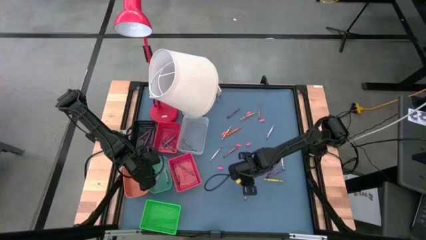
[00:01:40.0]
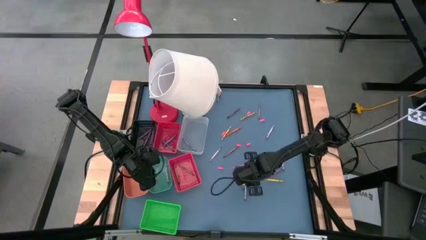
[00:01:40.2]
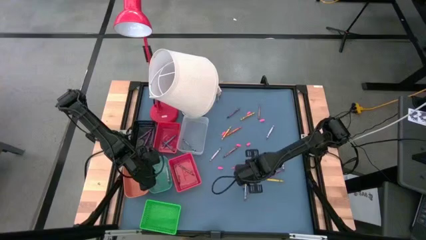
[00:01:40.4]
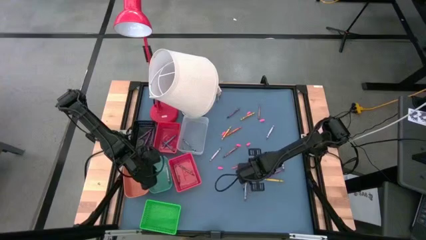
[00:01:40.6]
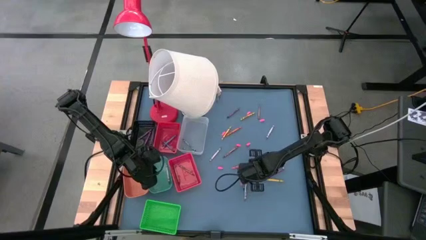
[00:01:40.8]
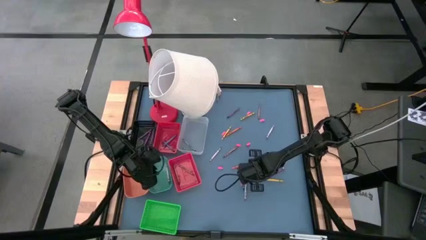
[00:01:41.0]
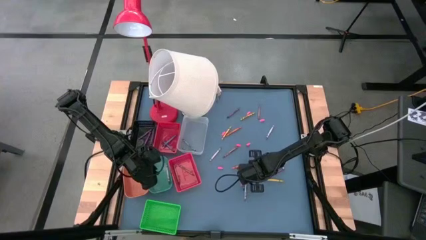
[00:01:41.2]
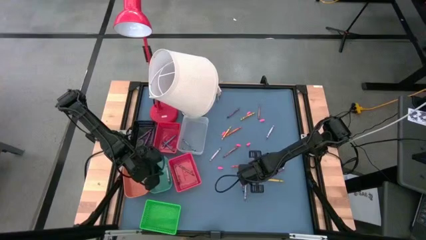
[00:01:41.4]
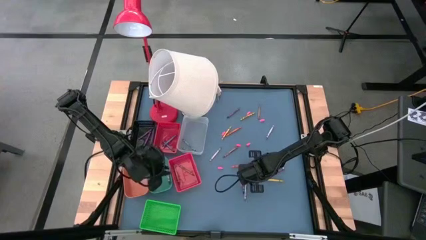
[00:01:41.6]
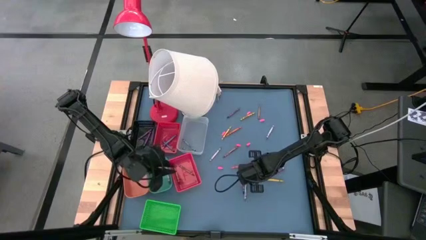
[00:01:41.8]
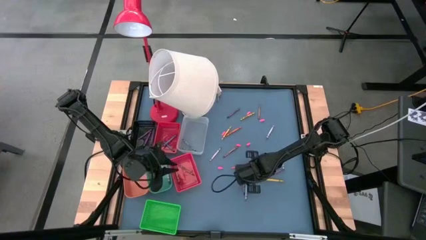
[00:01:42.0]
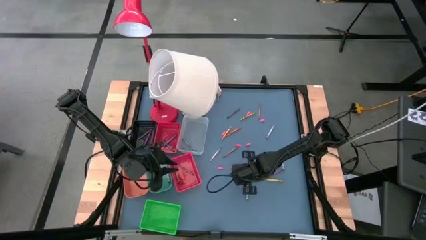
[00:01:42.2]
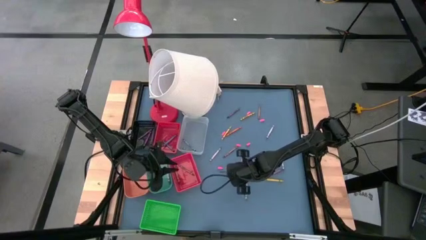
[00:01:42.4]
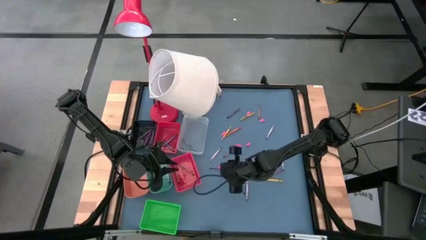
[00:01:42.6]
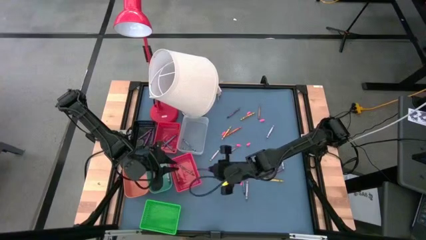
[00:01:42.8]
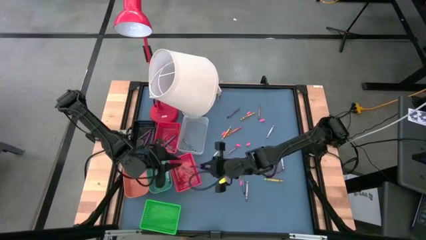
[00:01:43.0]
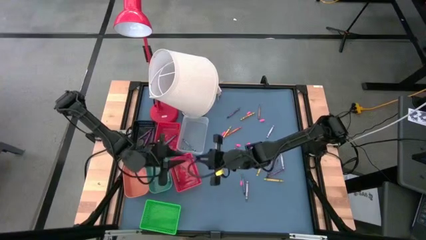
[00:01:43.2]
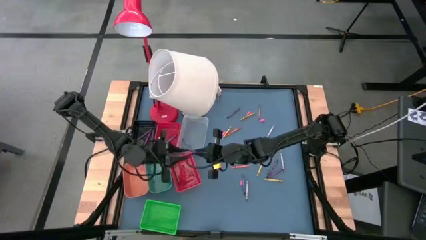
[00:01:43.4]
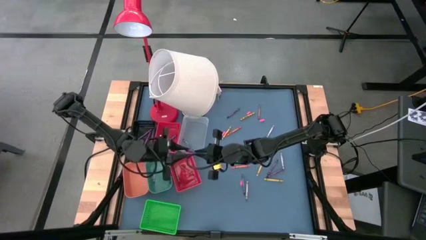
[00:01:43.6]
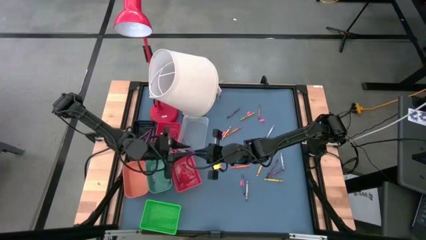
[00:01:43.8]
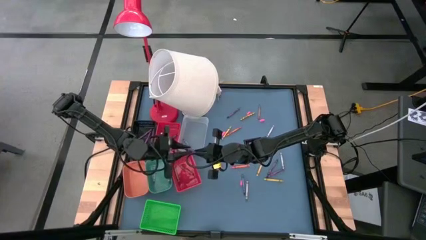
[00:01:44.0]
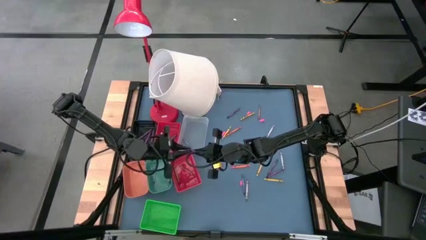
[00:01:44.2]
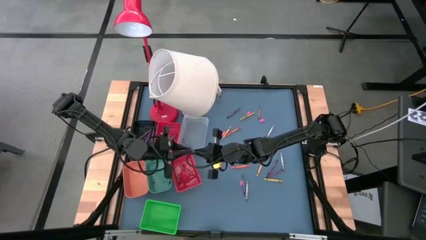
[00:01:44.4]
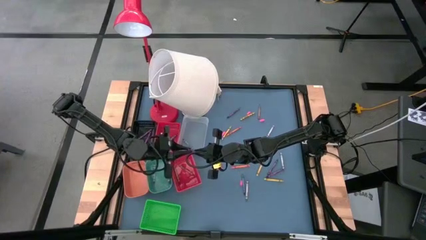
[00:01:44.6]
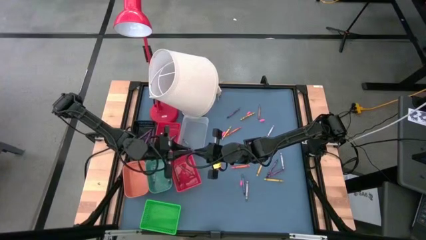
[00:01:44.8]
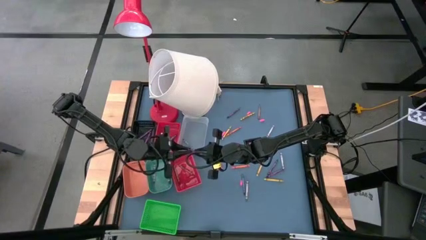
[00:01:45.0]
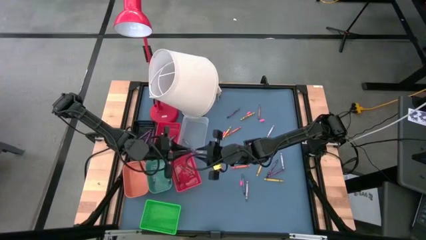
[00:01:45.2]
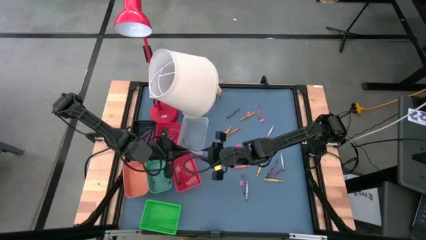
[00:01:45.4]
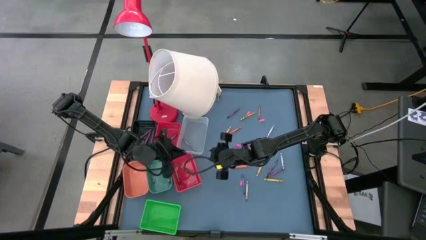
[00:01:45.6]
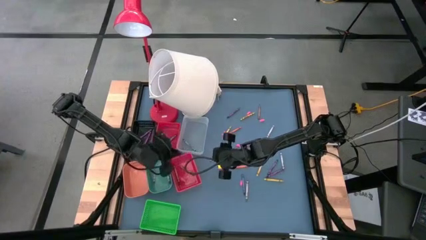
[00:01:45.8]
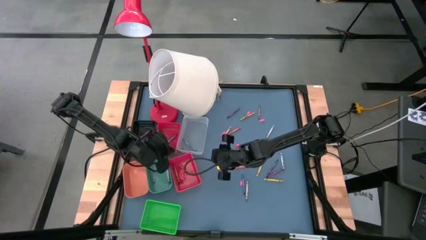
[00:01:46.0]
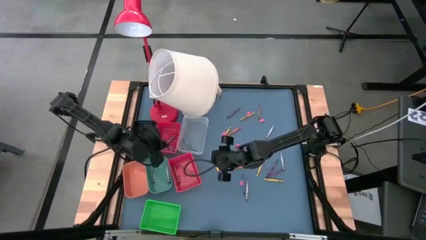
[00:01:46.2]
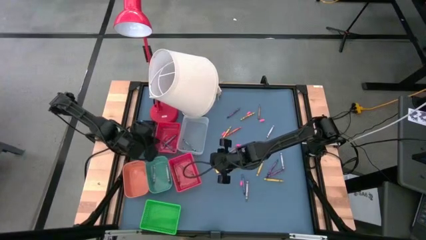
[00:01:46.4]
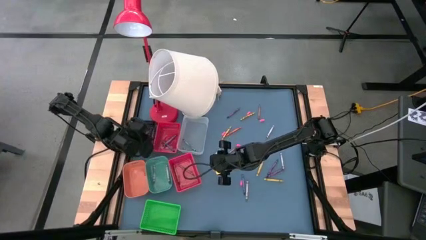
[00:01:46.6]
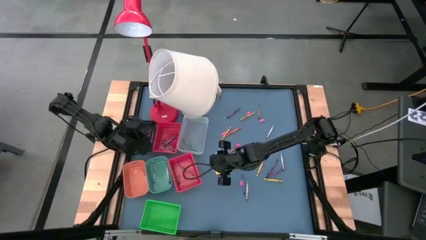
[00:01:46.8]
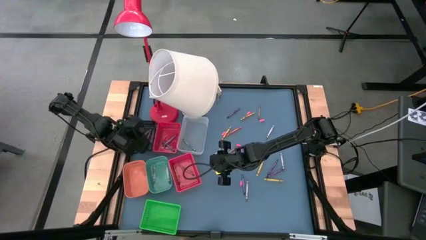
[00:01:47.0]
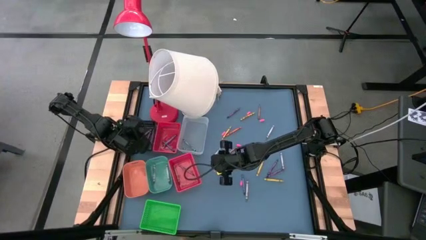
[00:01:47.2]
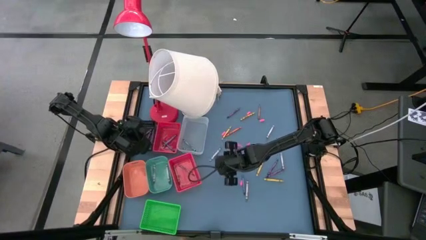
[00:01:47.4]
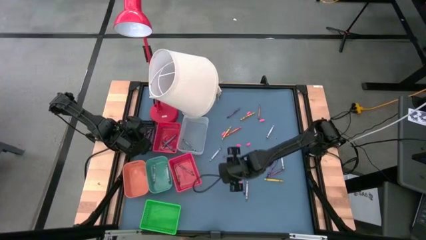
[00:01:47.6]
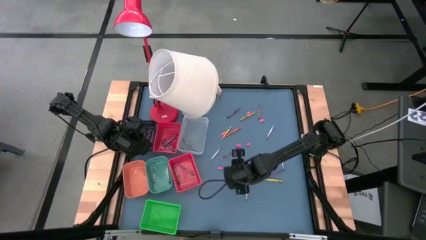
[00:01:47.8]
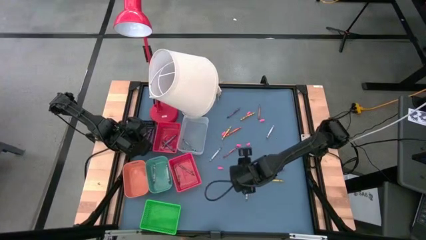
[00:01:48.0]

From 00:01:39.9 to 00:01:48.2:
Task: Sort crayons
Put the violet crayon into the black bin

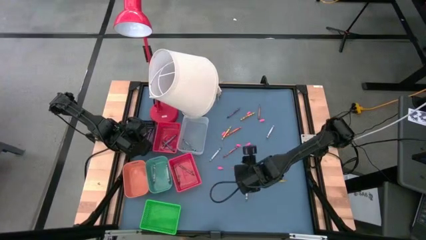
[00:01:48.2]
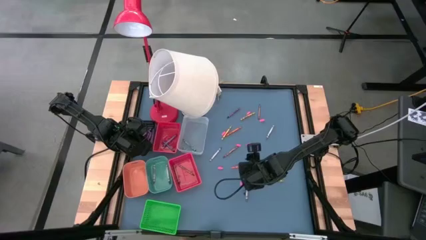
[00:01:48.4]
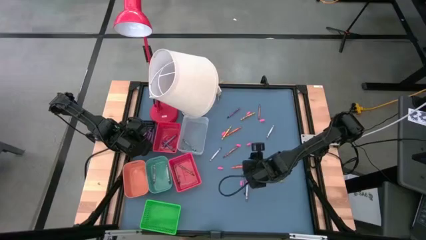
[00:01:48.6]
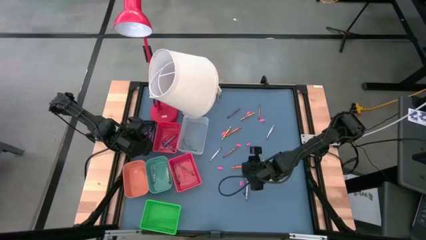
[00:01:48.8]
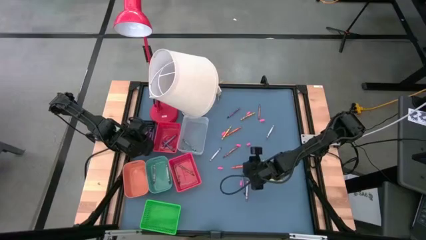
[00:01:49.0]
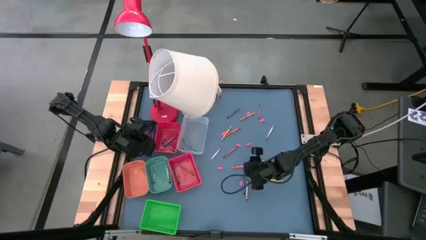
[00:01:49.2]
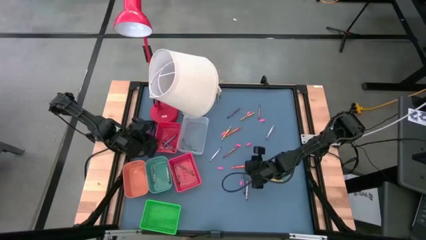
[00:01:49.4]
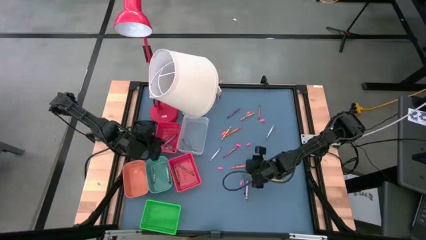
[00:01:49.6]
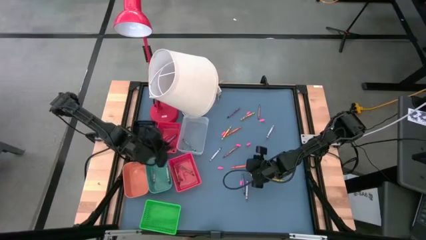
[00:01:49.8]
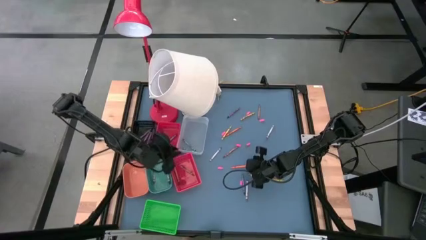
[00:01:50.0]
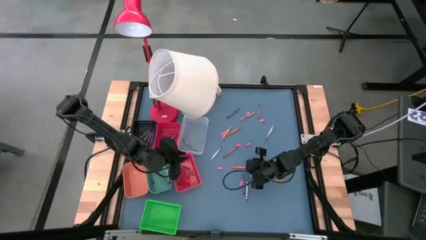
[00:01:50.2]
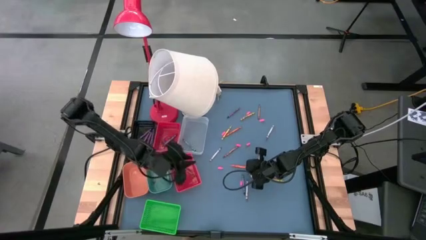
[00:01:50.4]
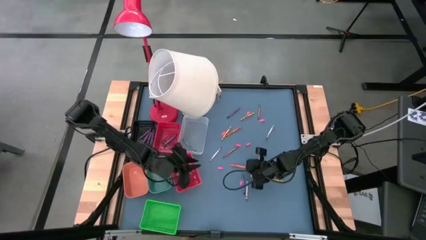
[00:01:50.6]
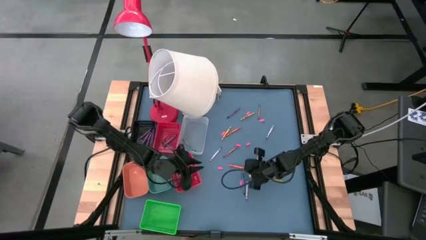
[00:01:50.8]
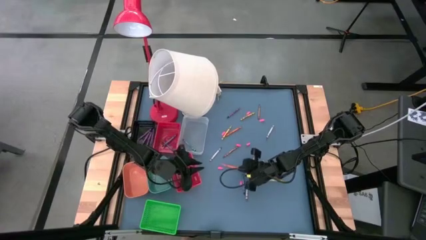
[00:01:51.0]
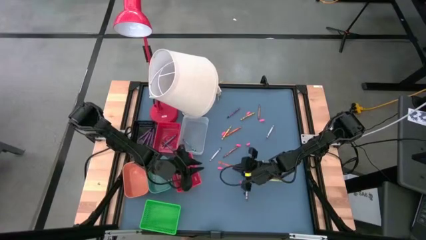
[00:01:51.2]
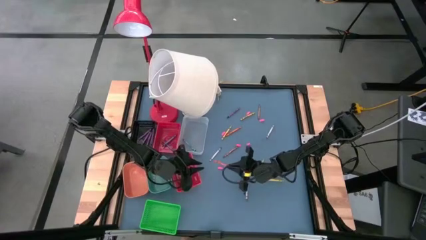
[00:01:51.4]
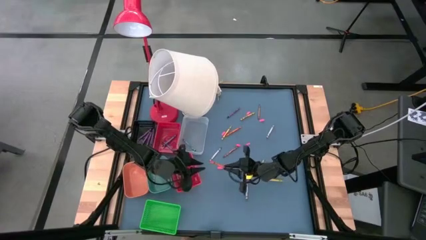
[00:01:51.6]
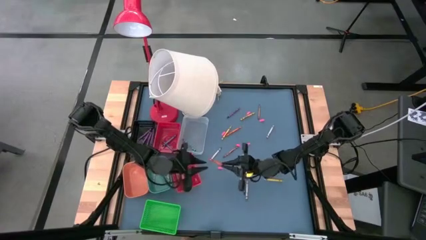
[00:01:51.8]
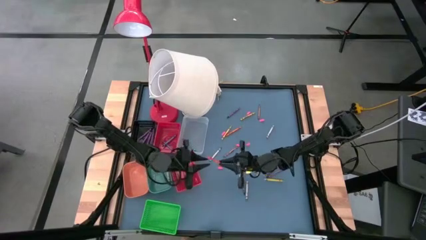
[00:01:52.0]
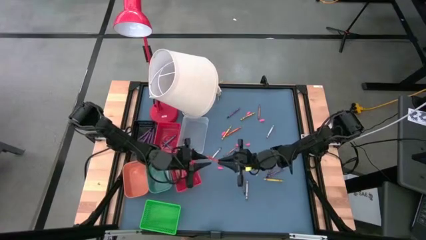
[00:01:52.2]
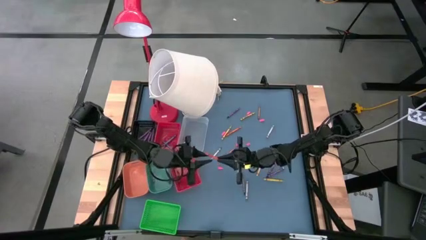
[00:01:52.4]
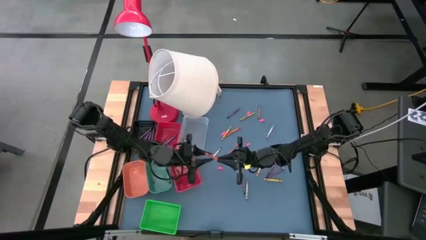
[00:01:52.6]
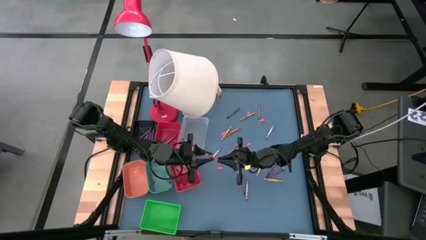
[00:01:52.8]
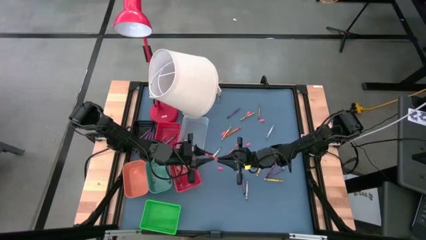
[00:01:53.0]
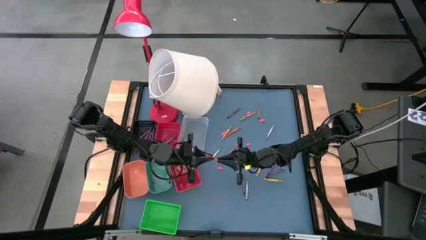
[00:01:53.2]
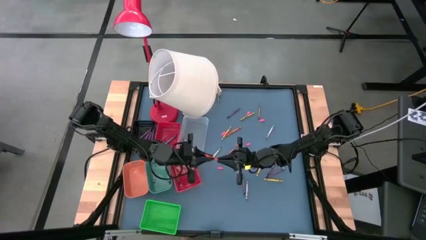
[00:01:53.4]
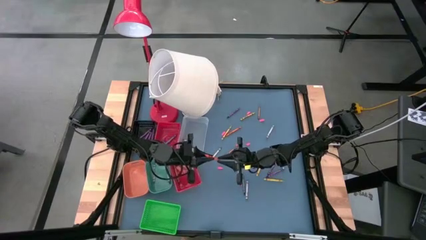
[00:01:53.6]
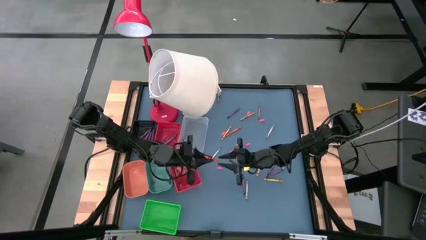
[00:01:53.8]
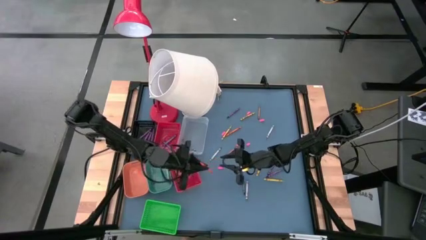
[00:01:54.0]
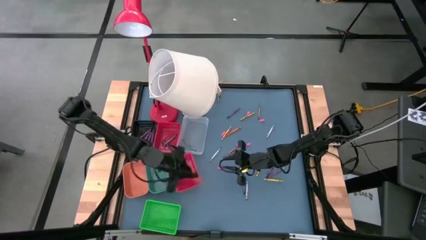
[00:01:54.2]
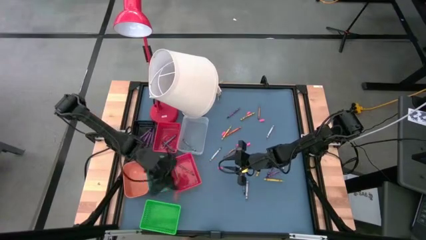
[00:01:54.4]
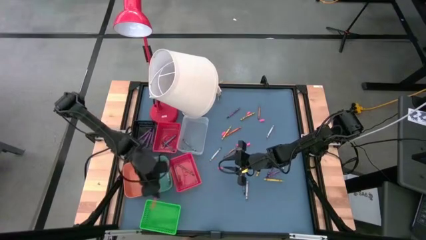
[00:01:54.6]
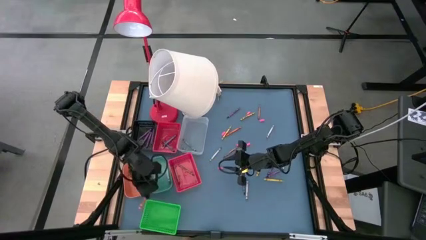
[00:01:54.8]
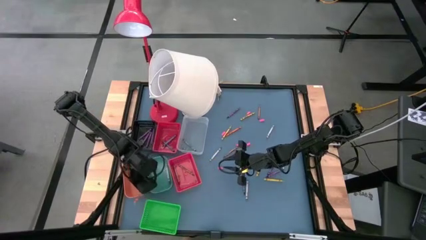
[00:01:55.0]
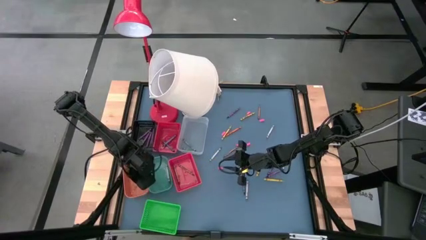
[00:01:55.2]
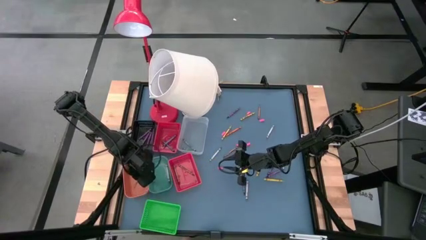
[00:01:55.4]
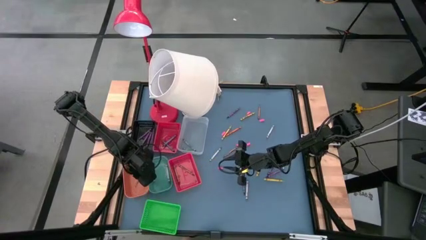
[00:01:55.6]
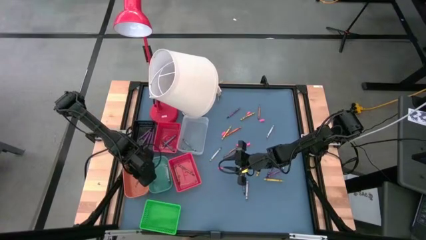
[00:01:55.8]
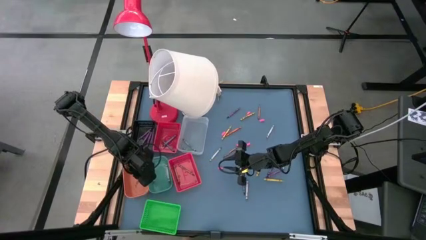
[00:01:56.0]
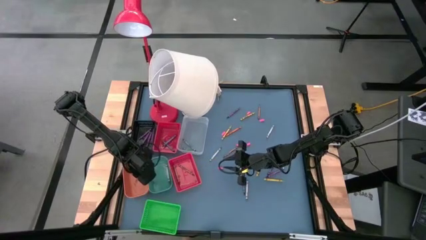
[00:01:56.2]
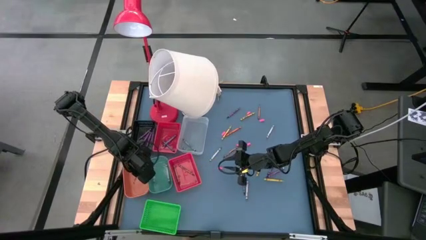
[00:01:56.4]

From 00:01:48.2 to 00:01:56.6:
Put the orange crayon into the orange bin
